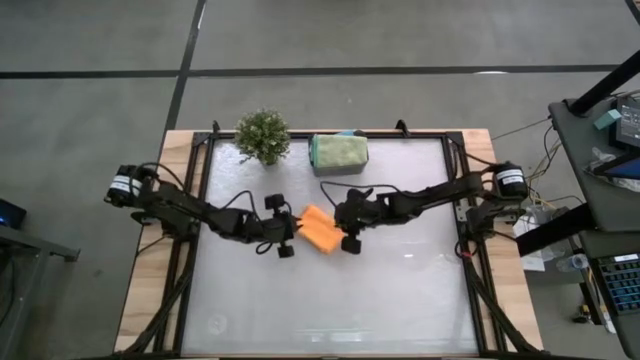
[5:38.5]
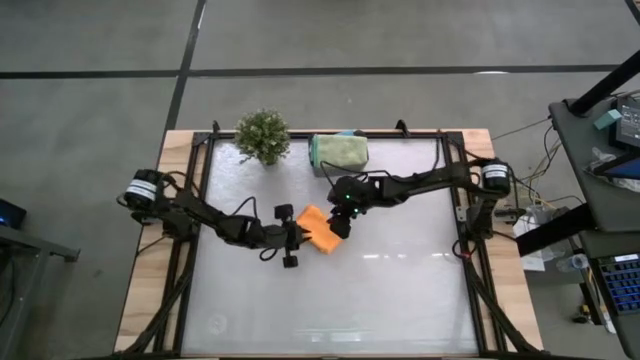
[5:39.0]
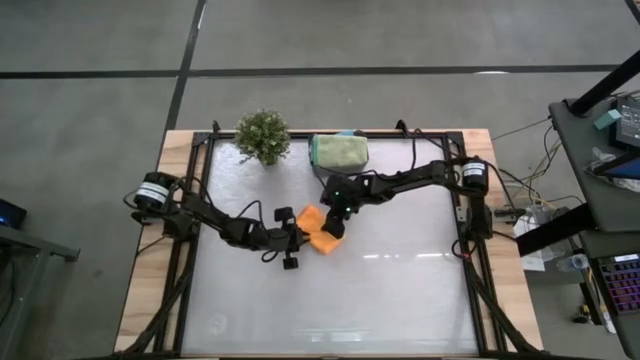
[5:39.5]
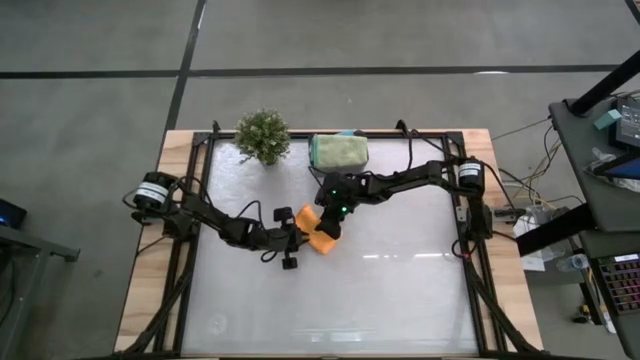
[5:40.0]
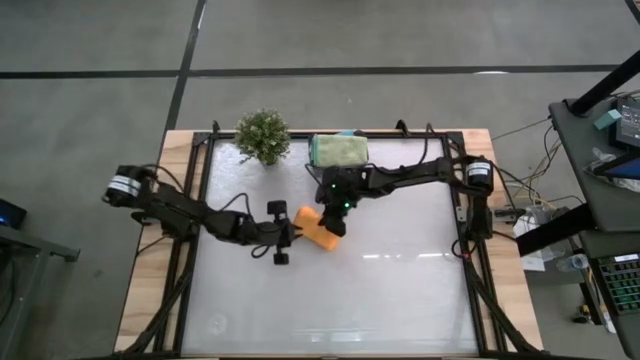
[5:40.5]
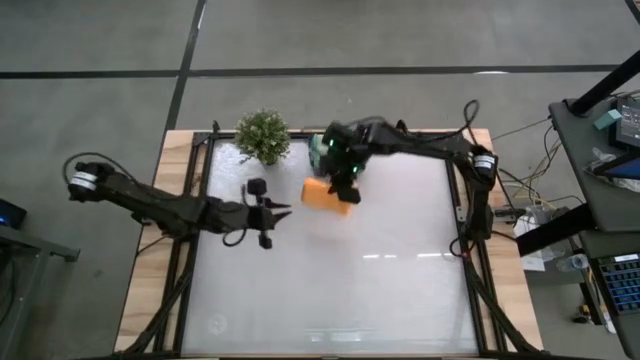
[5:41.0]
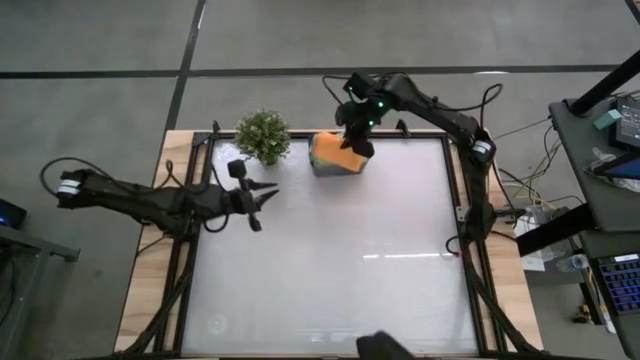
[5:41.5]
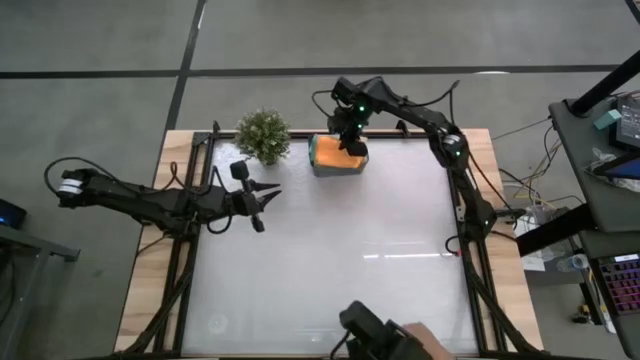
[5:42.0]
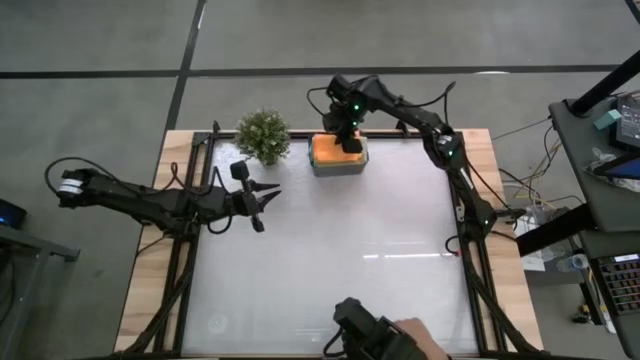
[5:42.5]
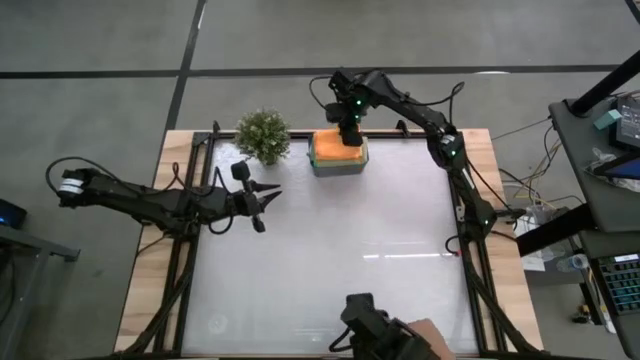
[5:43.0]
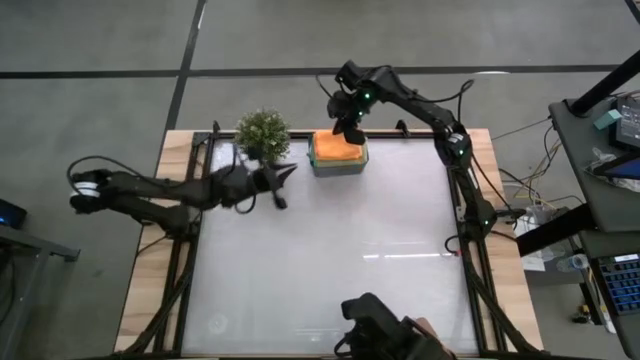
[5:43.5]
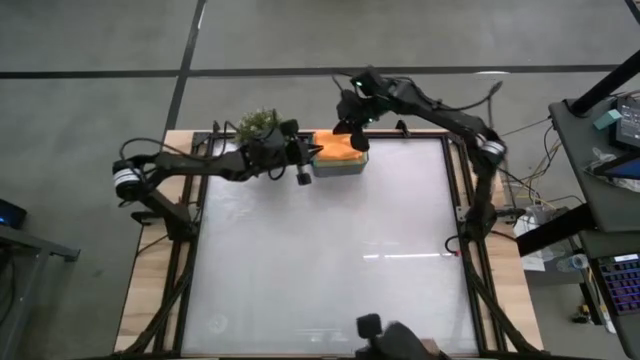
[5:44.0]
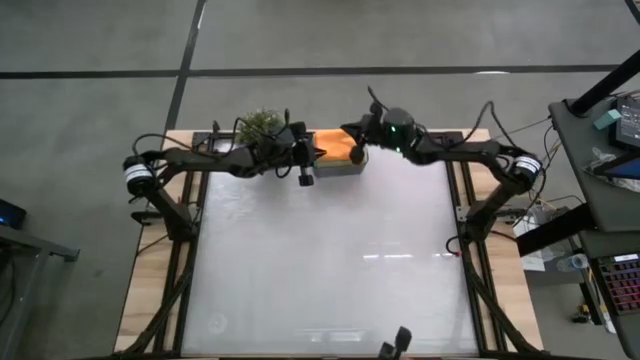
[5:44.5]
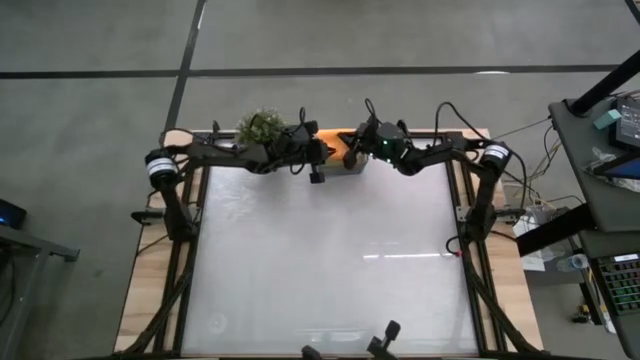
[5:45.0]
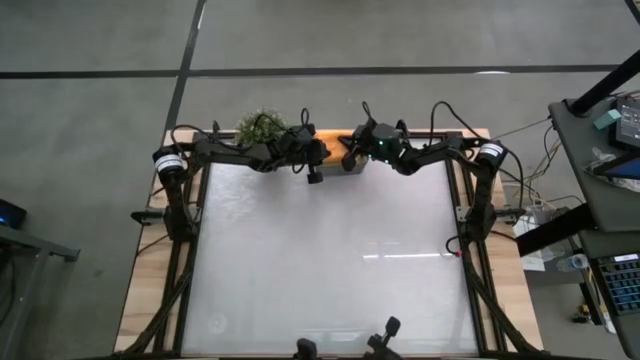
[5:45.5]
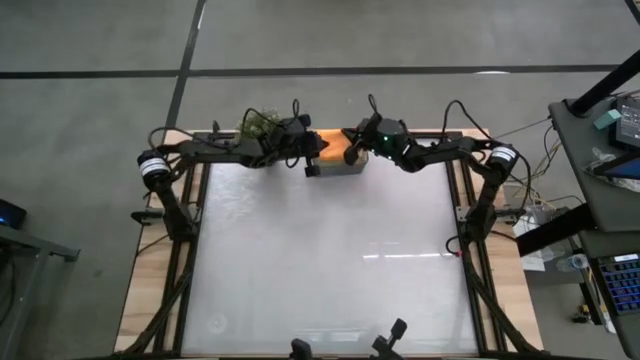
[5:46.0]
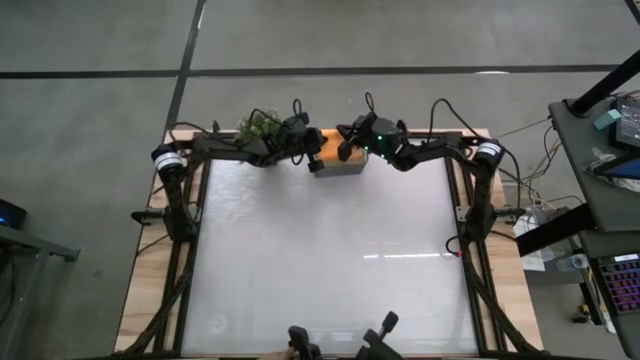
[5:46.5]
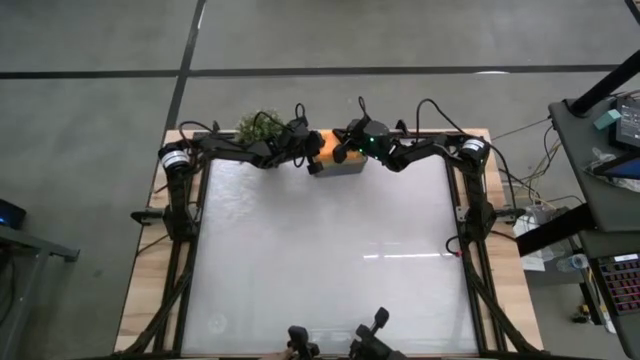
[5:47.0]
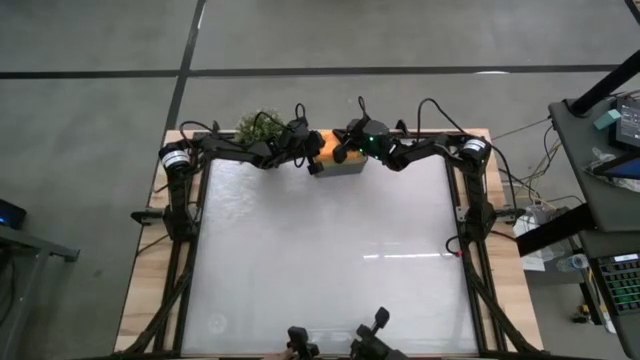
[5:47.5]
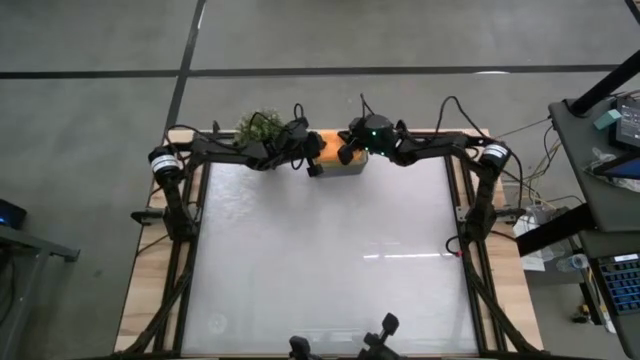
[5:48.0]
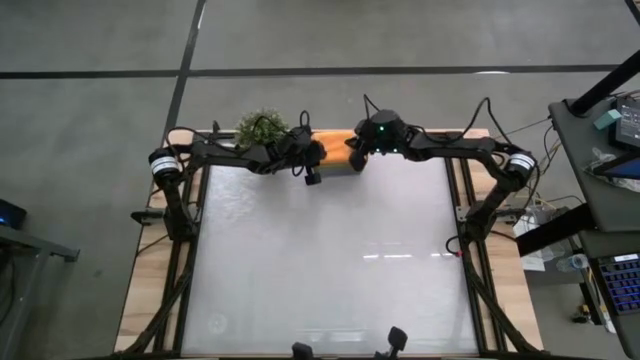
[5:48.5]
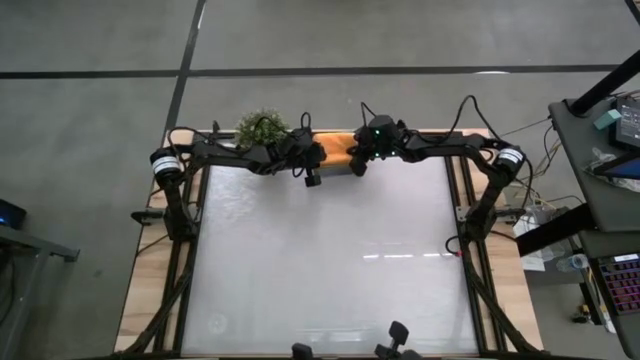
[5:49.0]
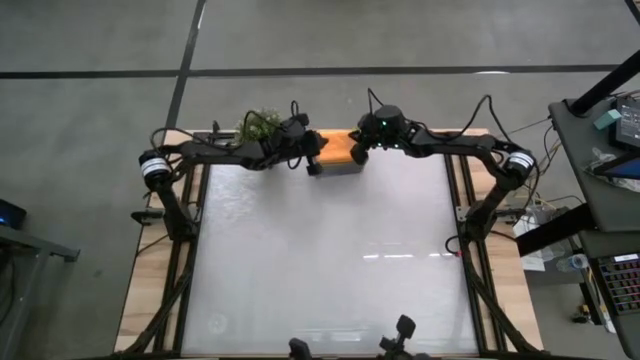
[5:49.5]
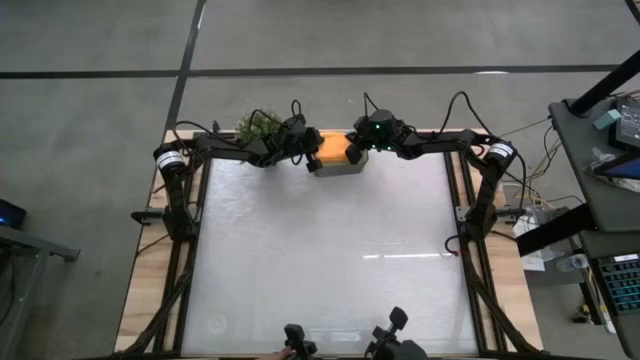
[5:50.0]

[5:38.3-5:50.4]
Task: Fold microfiber towels
Stack the folded orange on top of the folded green towel into the black bin

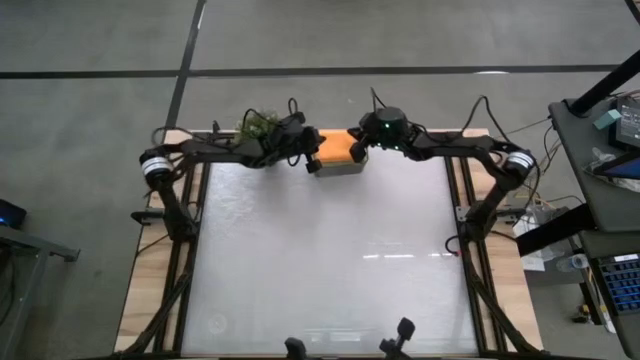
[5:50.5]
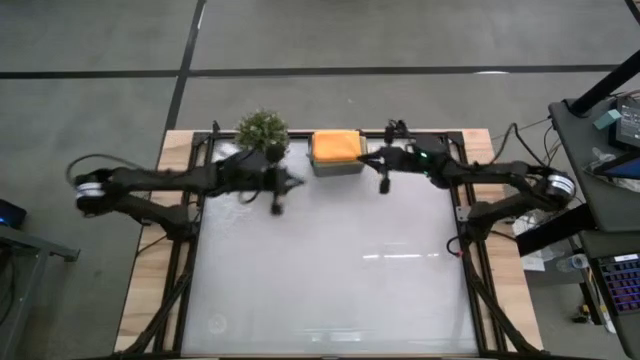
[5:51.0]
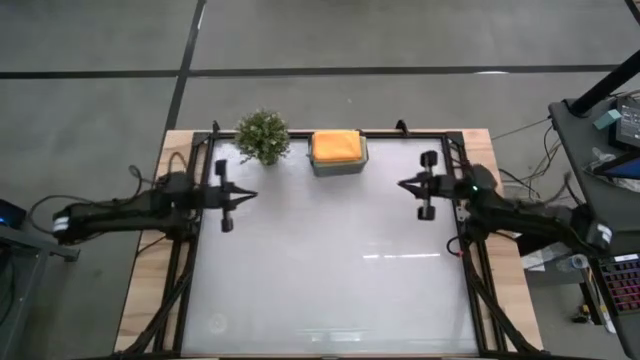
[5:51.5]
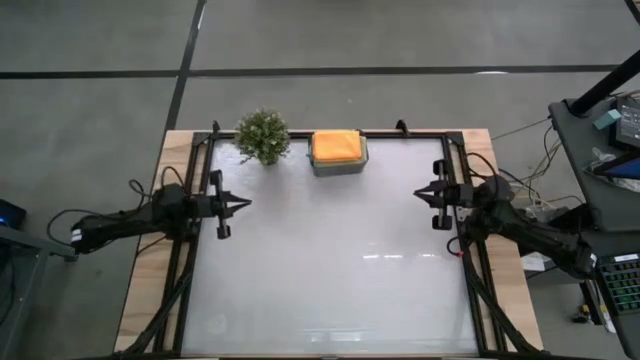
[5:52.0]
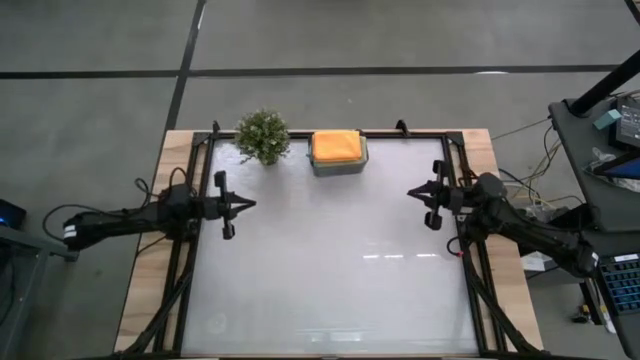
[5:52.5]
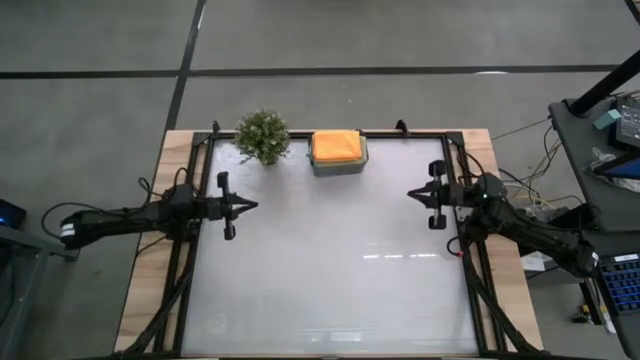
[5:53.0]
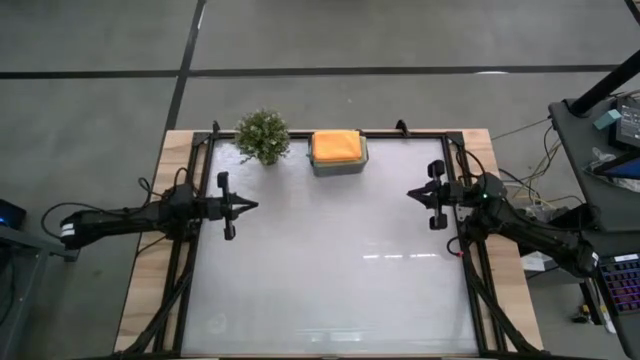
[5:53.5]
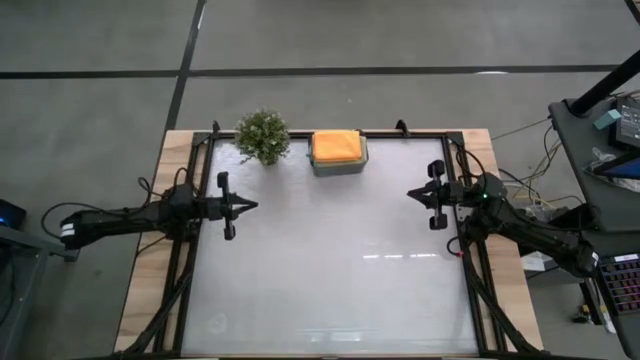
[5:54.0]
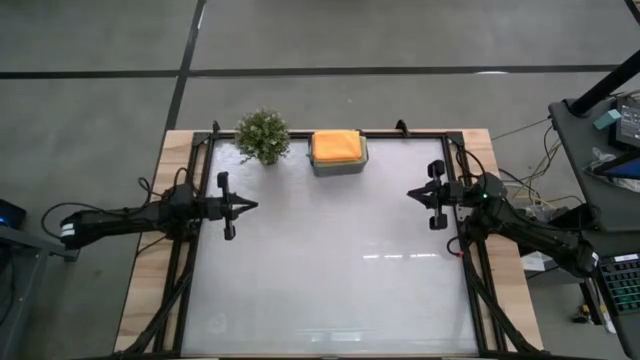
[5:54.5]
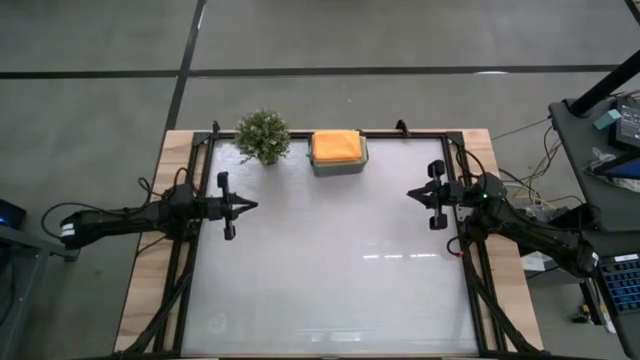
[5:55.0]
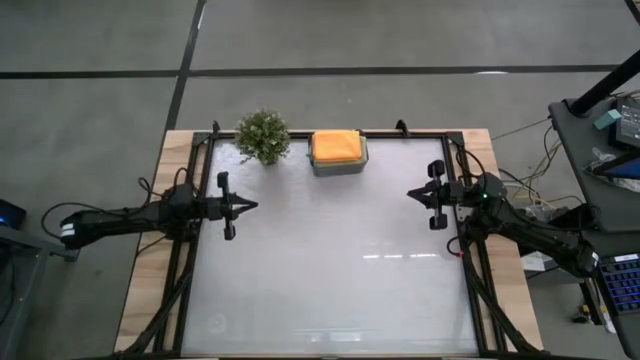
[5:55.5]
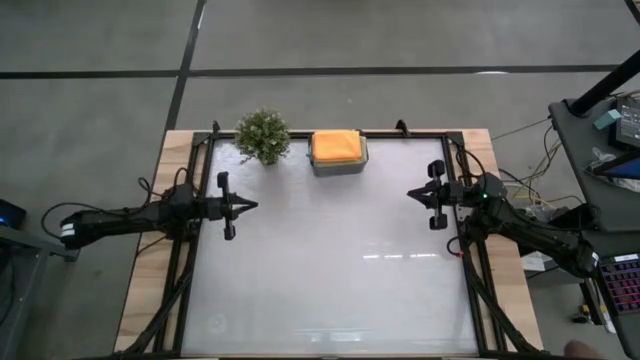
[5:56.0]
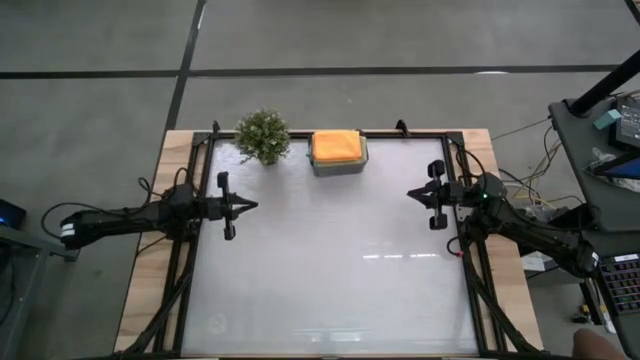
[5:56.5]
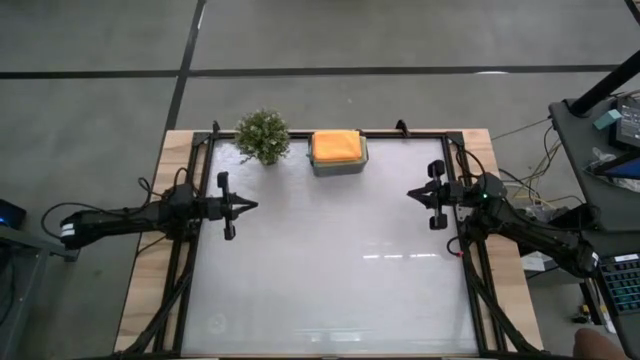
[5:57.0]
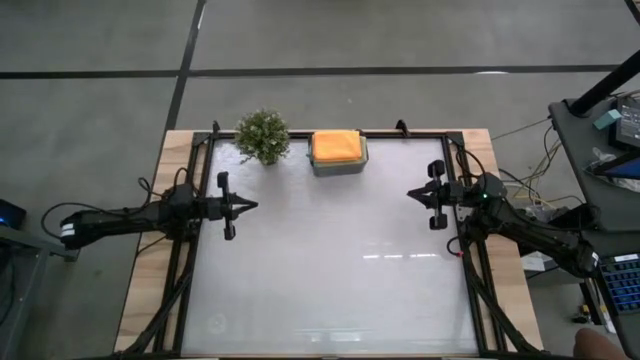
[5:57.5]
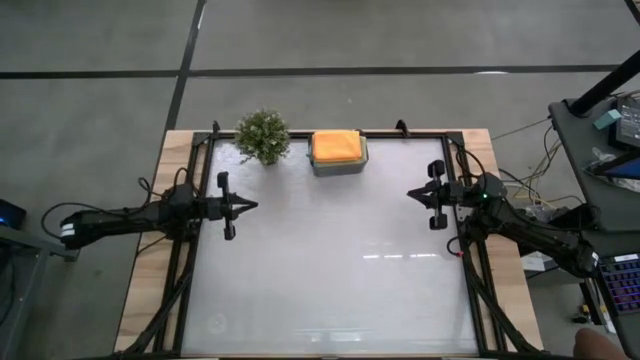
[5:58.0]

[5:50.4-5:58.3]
Return to home position

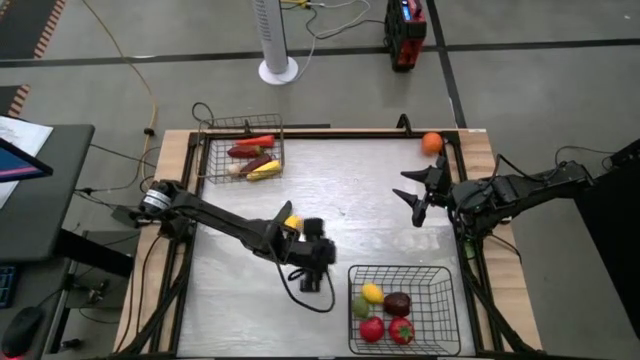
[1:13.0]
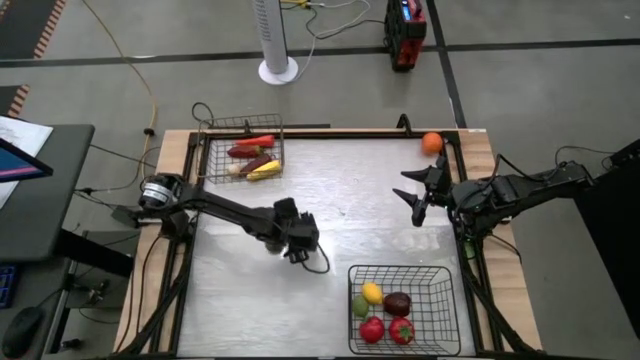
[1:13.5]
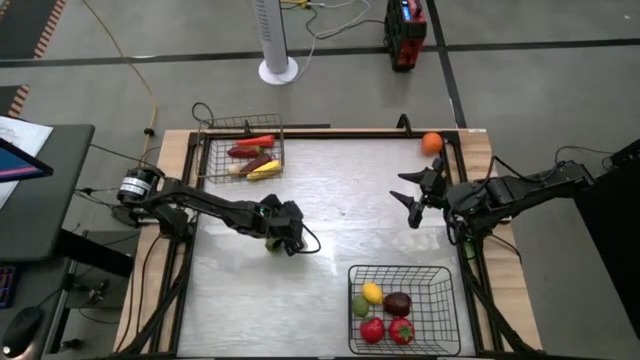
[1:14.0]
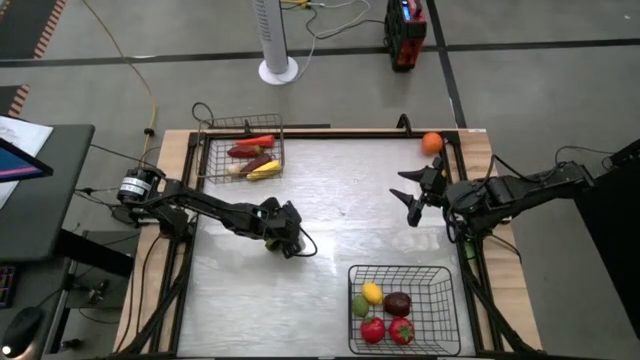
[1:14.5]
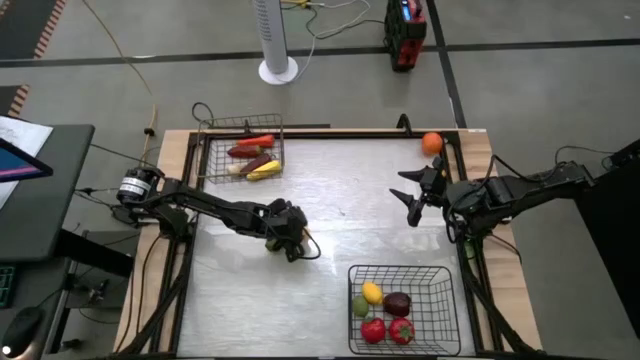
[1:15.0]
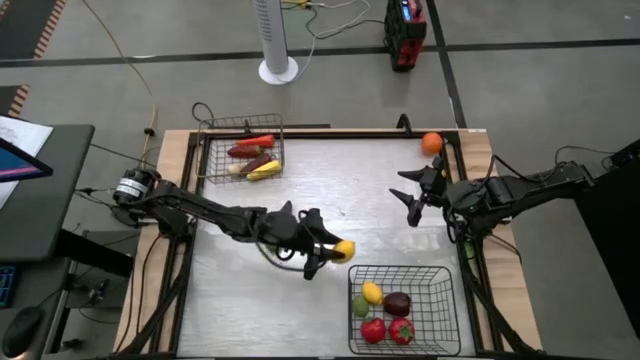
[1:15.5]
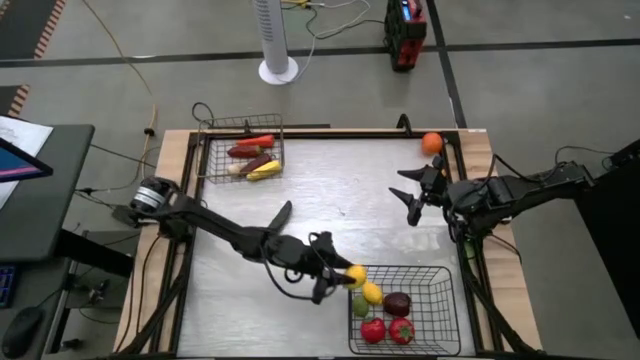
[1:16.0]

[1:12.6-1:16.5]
Task: Sort produce into baskets
Put the left lemon into the bottom wire basket
